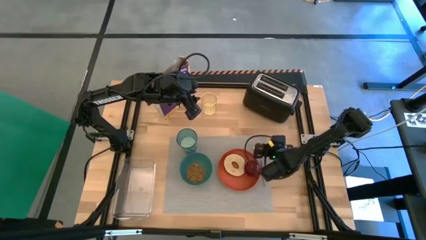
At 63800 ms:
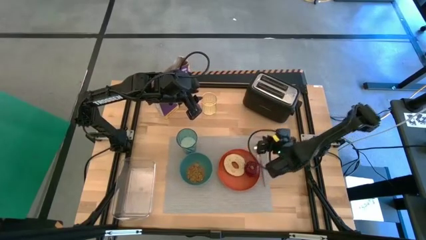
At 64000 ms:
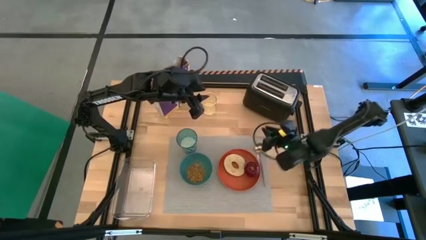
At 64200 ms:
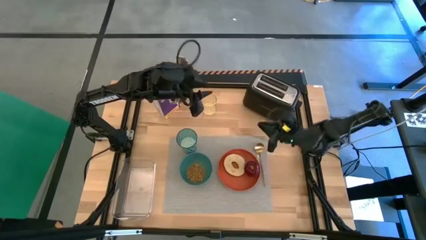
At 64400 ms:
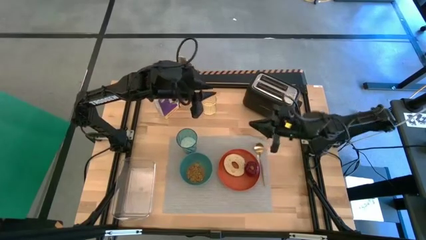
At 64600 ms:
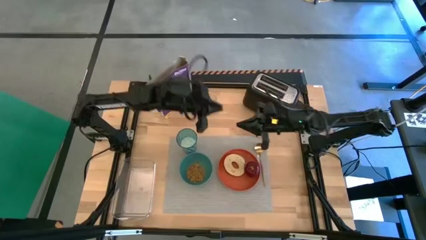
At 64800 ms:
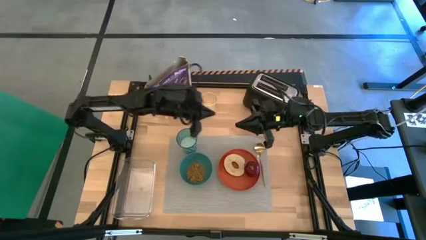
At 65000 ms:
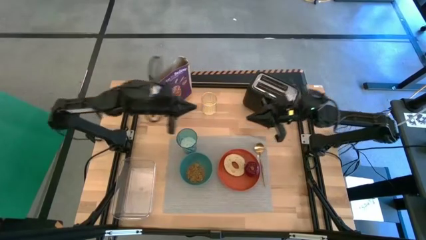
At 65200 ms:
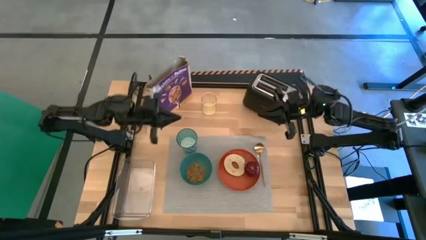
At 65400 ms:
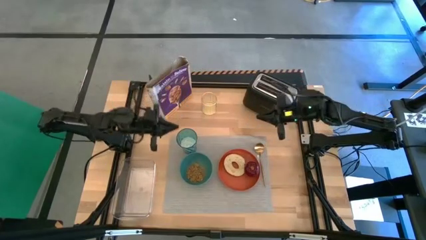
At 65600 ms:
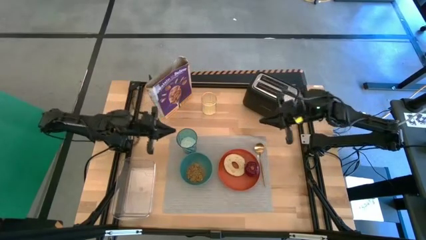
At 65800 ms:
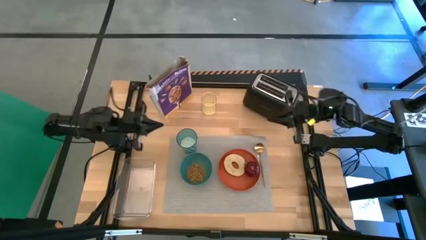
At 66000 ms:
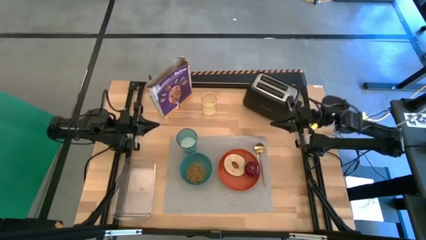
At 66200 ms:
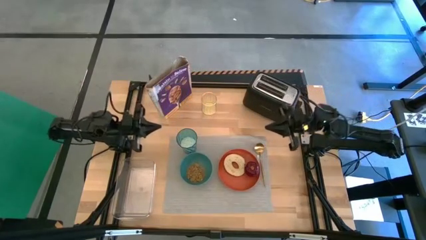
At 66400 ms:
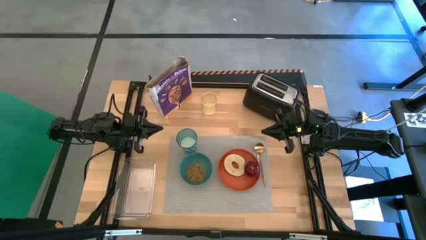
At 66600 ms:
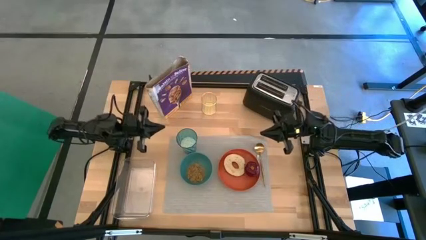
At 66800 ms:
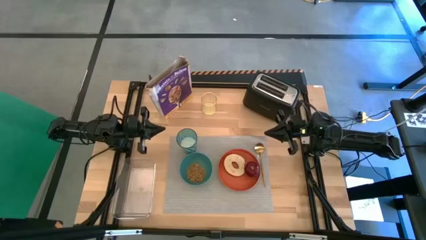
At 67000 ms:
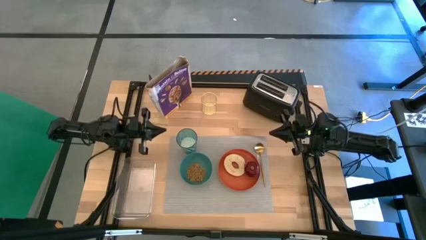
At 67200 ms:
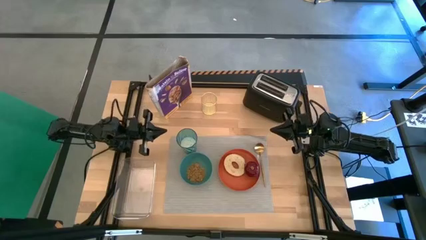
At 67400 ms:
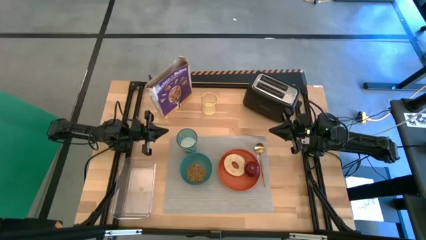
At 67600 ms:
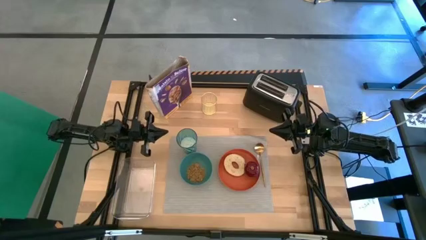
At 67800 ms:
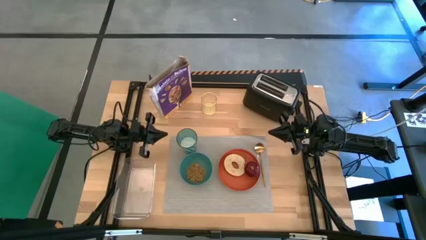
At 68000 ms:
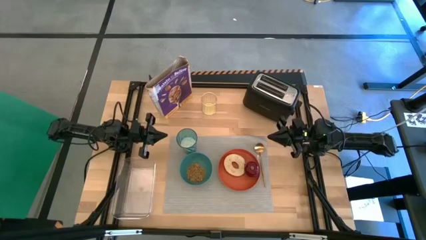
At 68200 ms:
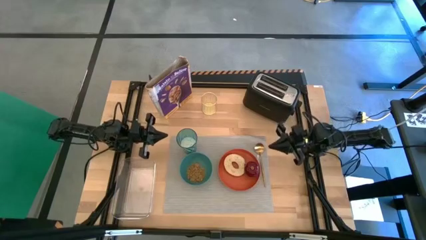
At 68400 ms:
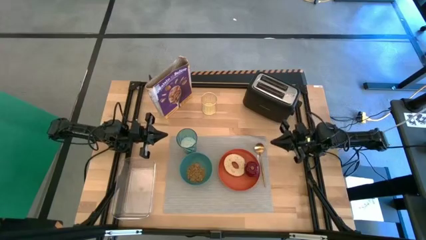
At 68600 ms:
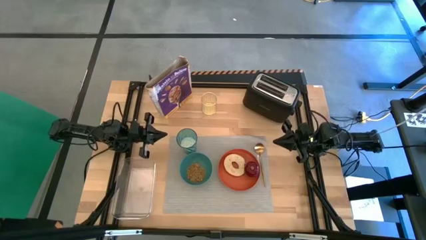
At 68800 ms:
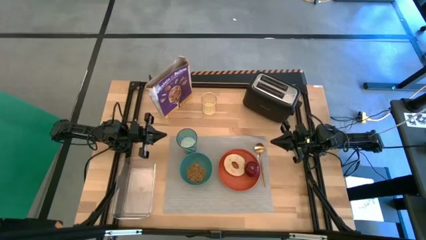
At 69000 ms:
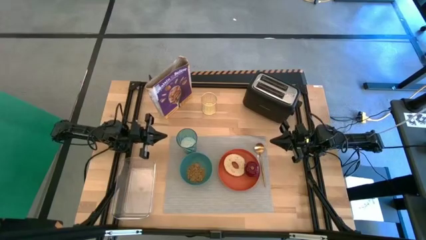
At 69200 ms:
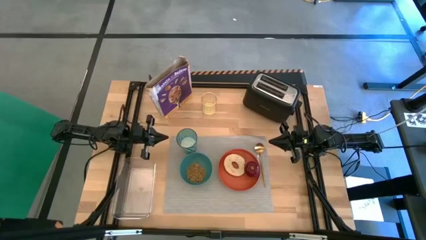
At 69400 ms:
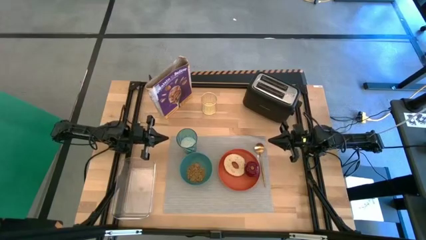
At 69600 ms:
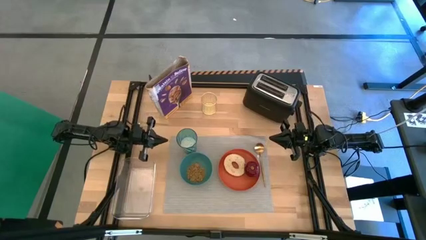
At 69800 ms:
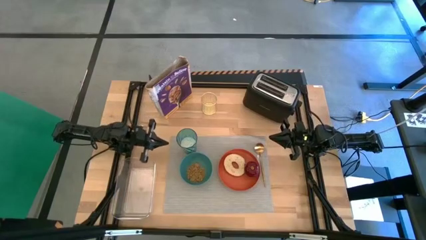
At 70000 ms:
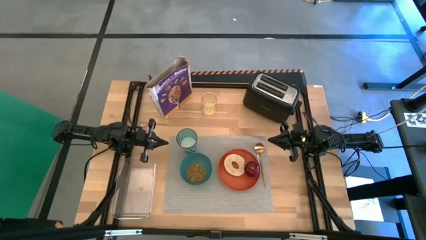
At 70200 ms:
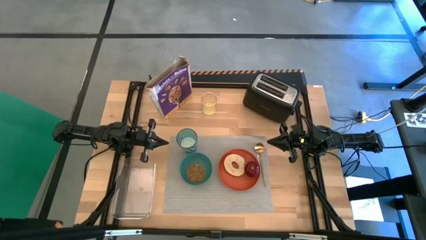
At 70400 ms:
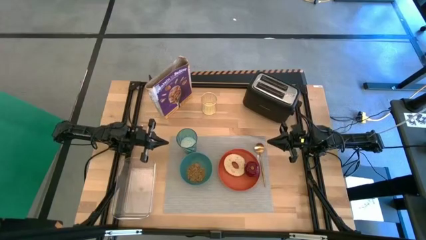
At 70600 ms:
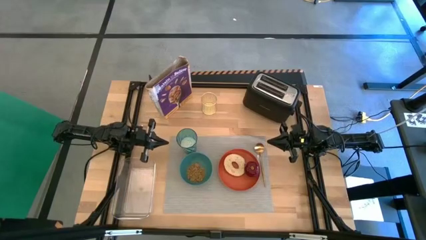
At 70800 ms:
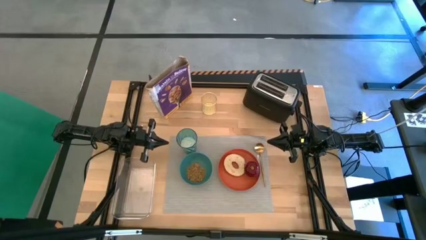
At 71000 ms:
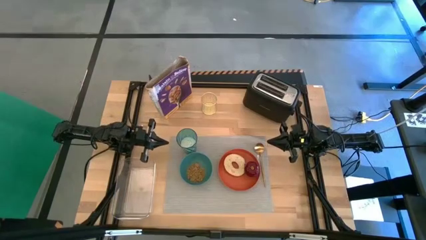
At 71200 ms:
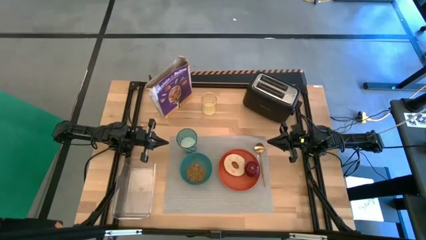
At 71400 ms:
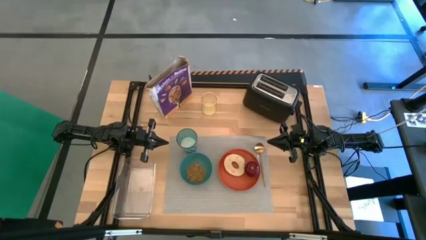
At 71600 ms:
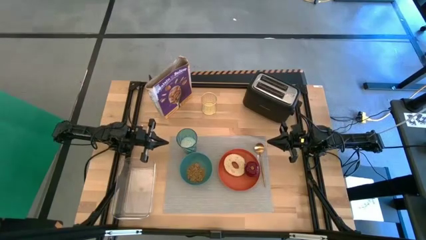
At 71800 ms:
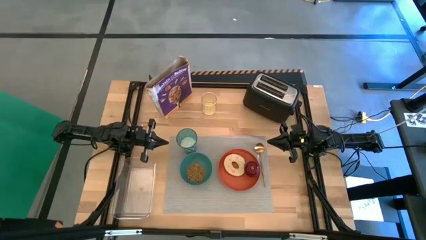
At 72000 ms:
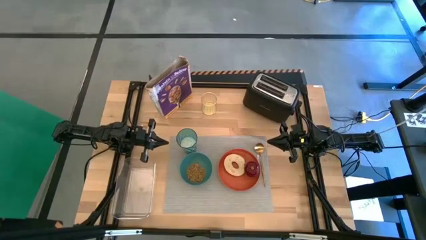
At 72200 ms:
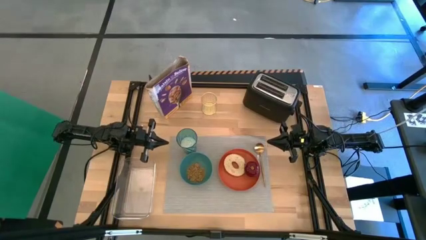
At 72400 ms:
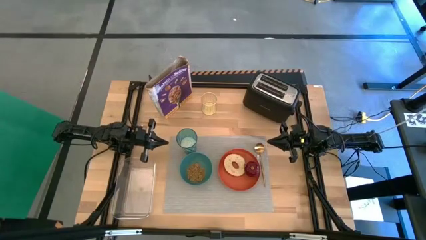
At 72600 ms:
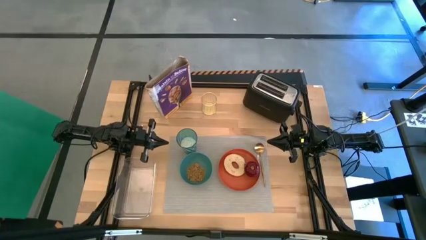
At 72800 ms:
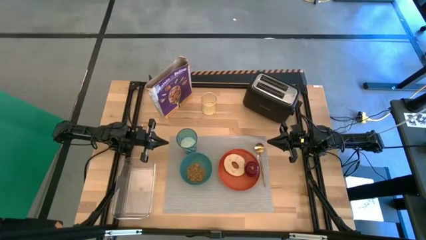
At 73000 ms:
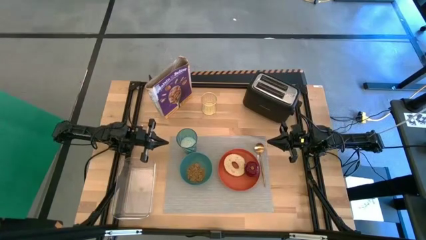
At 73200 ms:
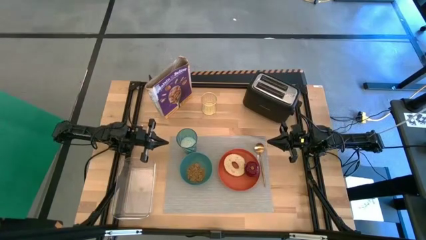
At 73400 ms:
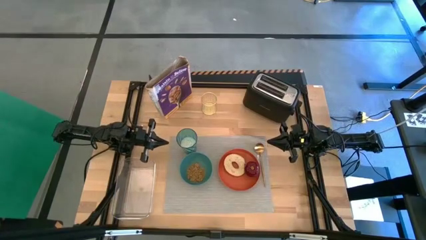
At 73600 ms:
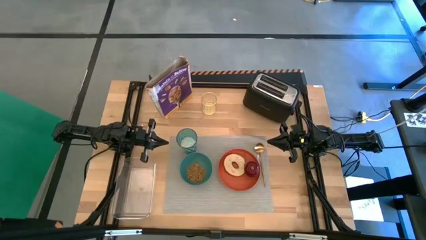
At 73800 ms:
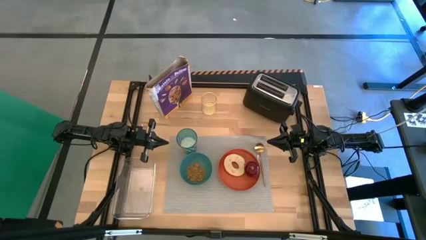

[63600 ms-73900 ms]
Task: Arrange a breakfast setting
Return to Home Position

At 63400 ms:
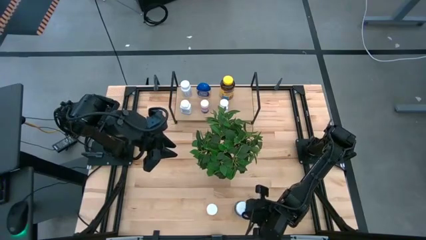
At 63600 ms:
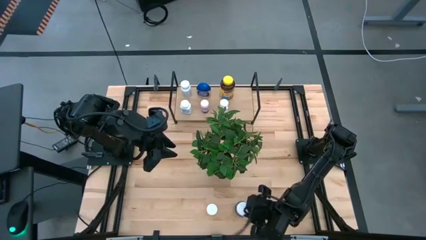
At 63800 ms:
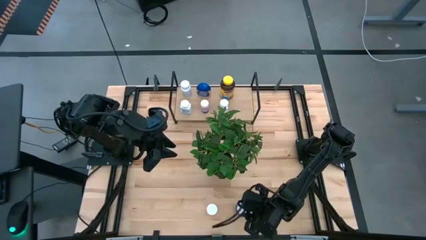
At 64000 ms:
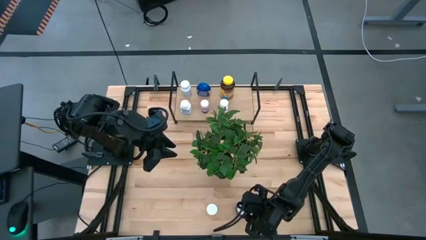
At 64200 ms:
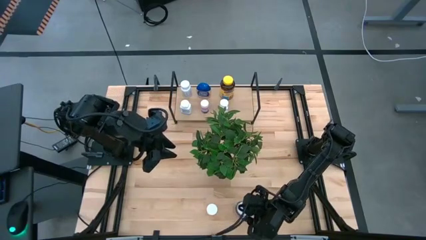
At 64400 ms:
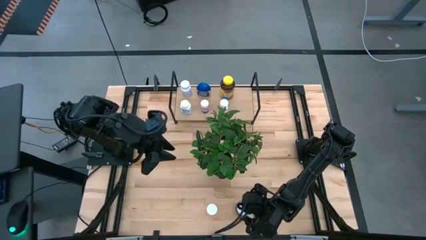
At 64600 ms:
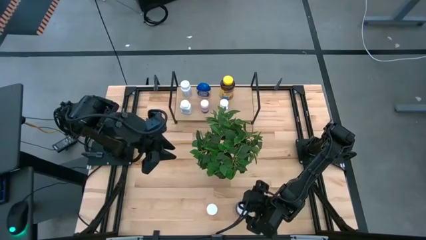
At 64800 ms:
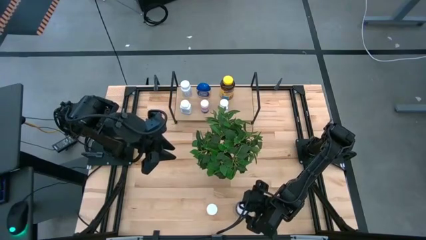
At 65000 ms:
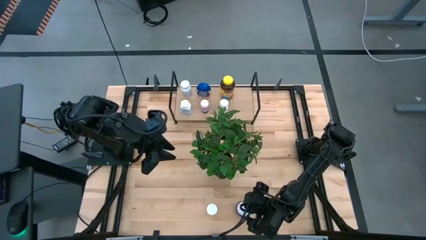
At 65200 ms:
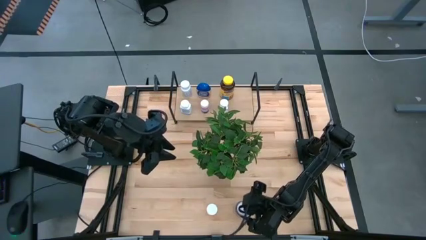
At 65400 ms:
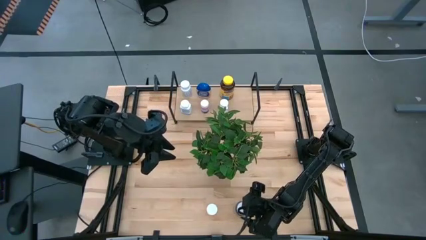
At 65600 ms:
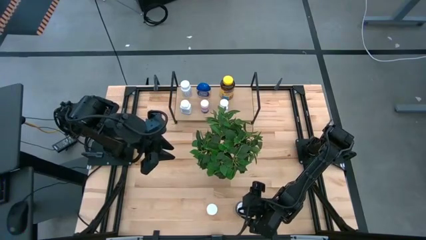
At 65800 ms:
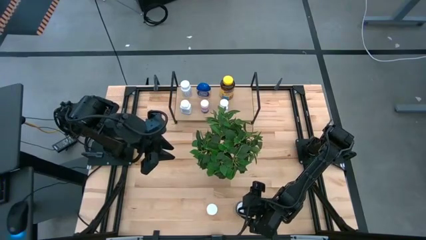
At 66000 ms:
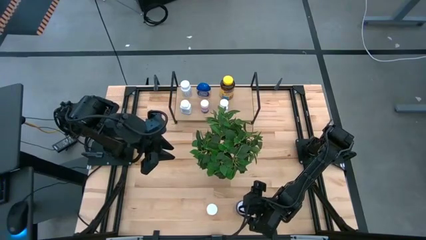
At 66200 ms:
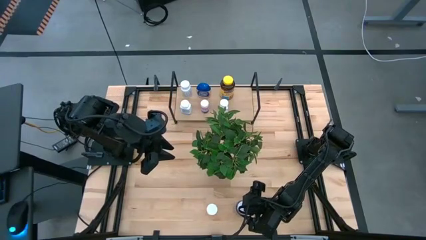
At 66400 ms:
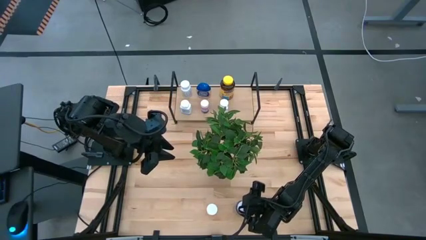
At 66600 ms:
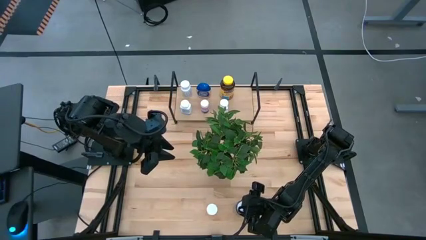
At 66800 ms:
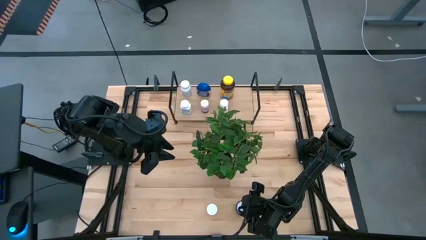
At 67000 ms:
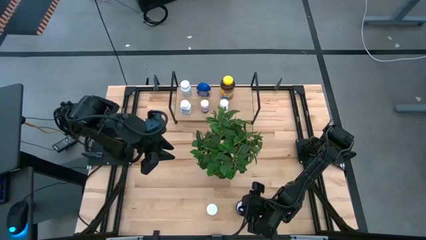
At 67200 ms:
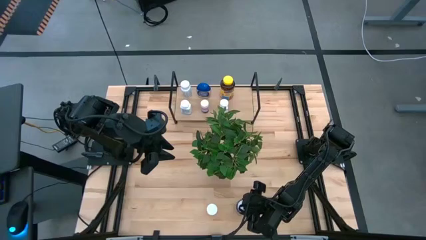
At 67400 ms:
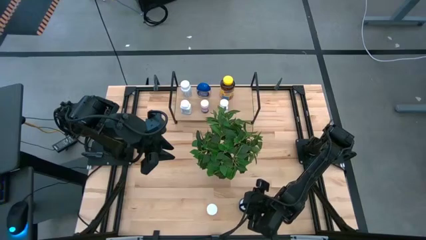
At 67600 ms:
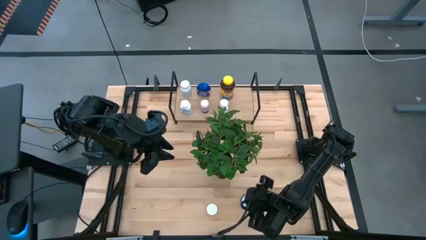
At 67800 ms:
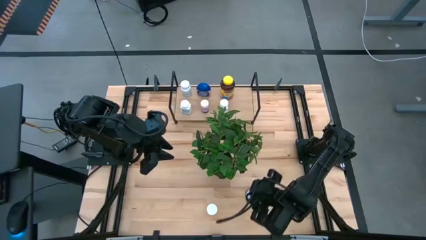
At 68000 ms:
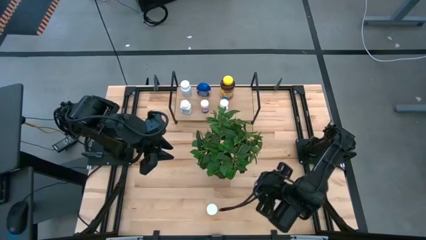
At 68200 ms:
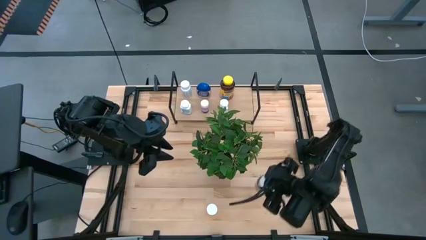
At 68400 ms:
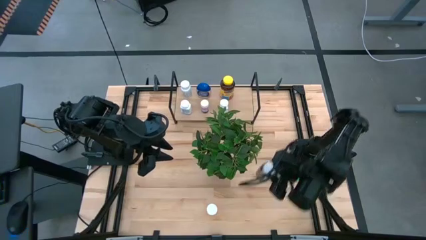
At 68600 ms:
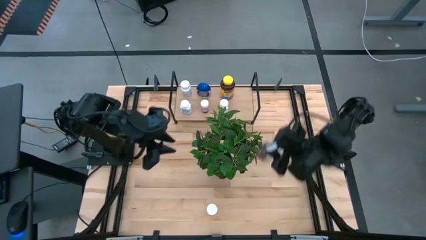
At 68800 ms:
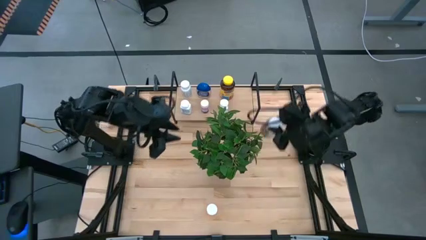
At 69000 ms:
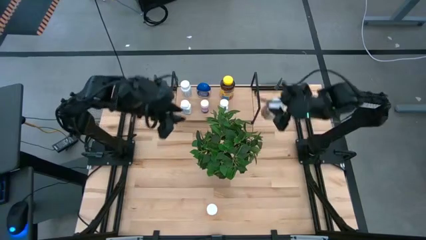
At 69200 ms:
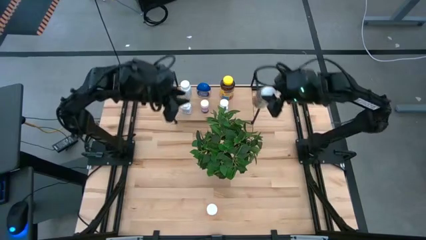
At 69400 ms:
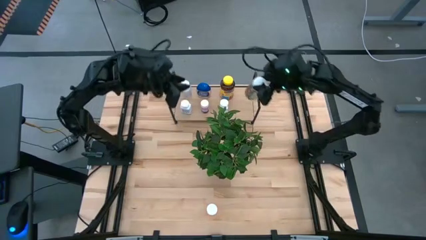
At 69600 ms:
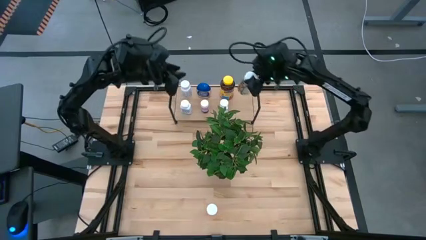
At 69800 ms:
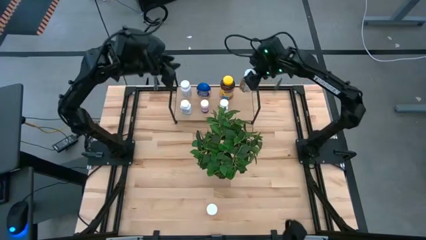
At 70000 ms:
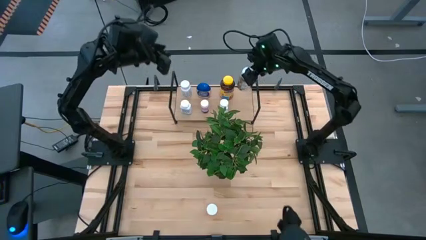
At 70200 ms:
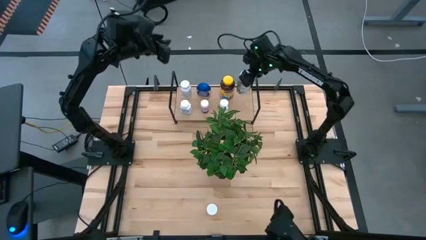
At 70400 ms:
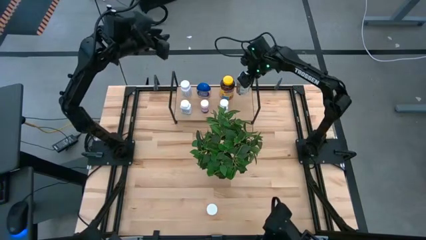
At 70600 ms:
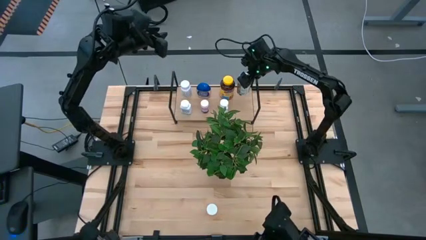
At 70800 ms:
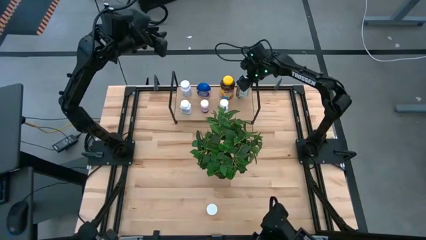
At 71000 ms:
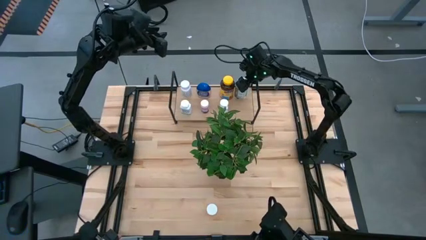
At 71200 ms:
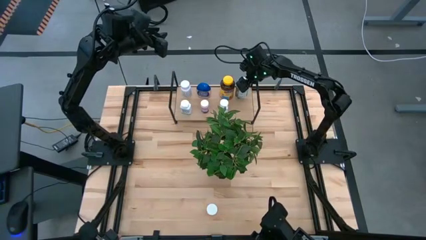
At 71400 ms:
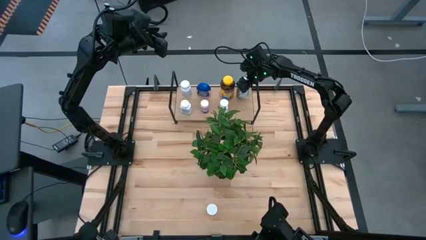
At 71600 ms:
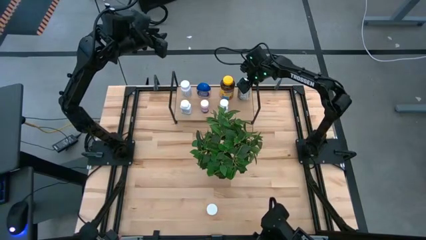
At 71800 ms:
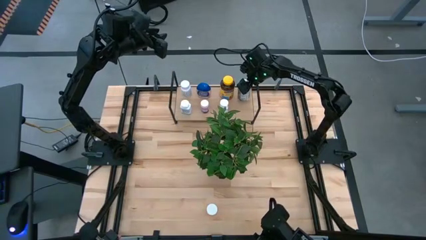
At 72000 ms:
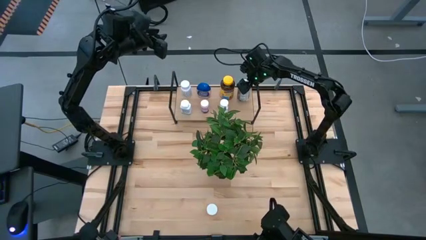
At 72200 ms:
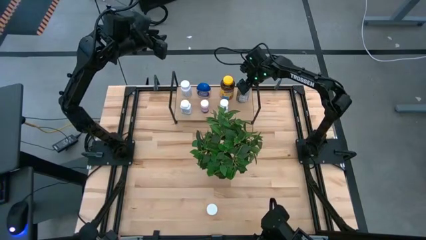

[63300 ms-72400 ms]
Task: Pick and place medicine bottles onto shelf by color
Put the green pill bottle on the shelf
